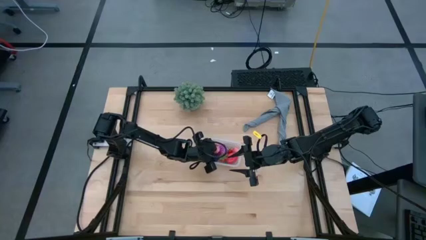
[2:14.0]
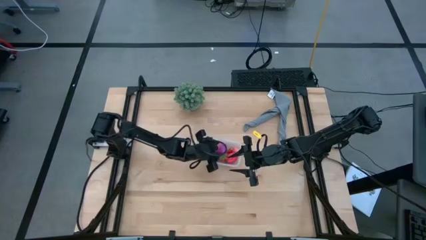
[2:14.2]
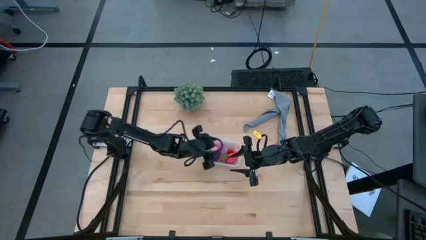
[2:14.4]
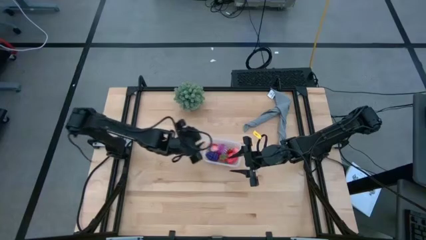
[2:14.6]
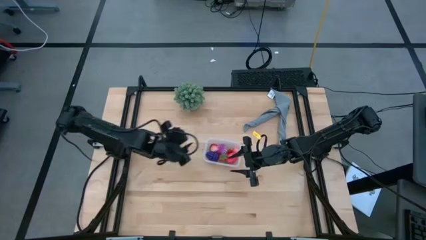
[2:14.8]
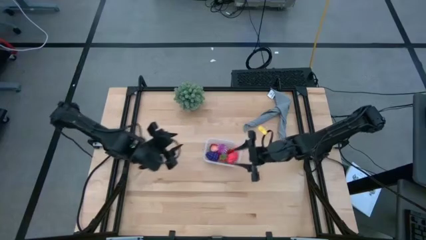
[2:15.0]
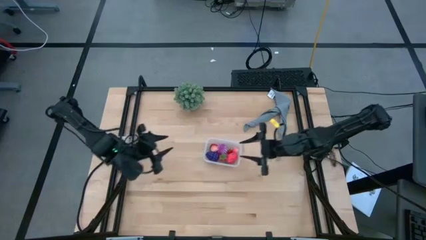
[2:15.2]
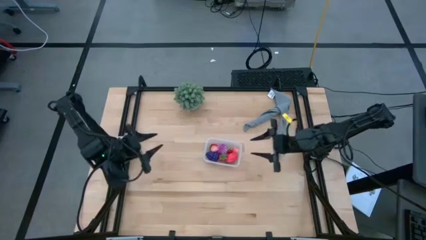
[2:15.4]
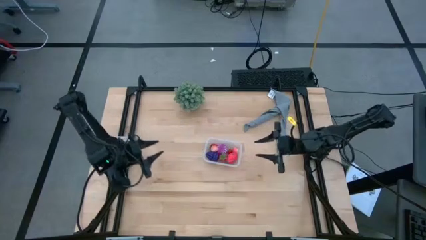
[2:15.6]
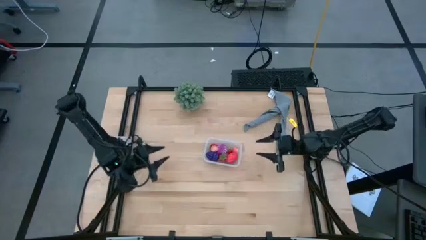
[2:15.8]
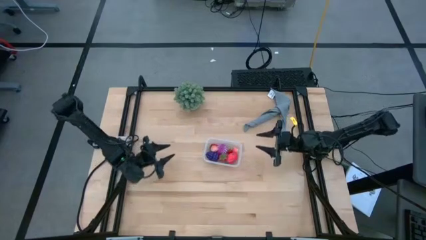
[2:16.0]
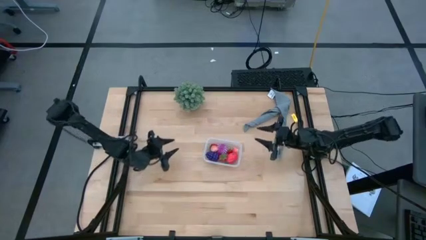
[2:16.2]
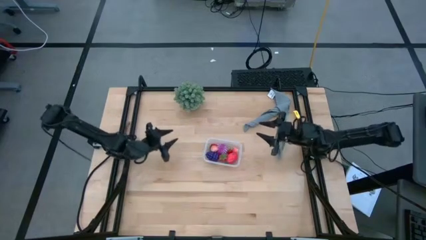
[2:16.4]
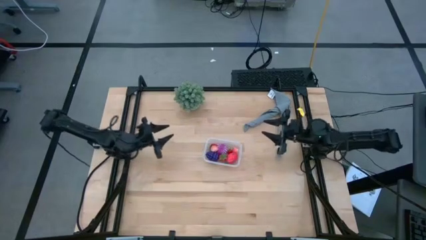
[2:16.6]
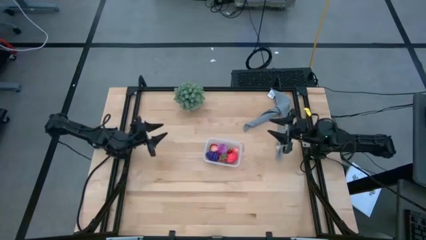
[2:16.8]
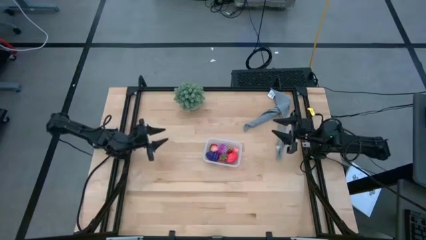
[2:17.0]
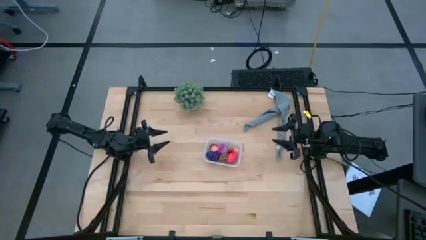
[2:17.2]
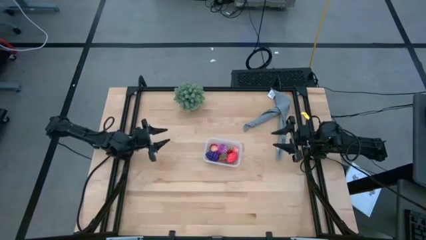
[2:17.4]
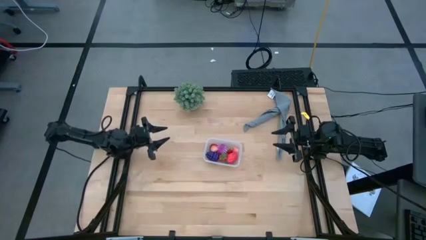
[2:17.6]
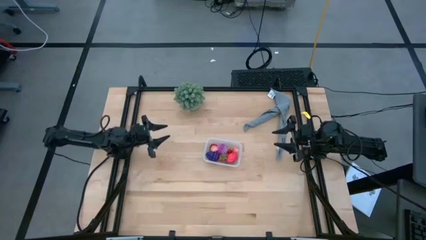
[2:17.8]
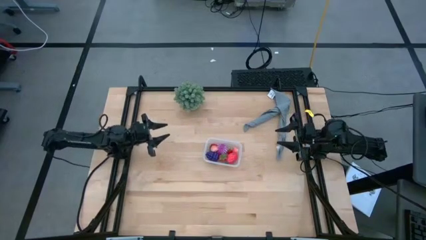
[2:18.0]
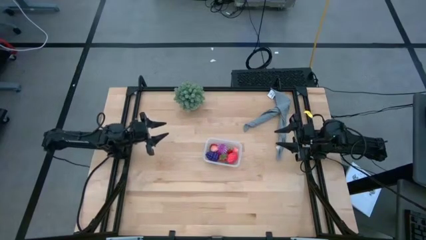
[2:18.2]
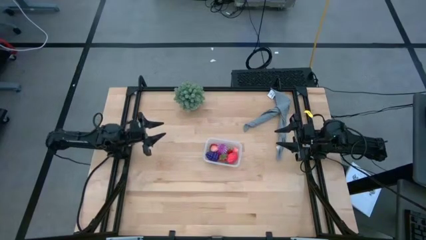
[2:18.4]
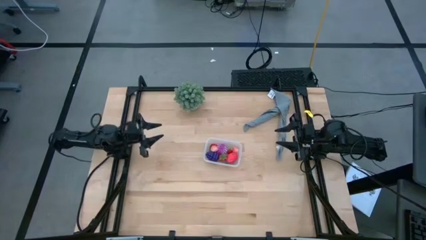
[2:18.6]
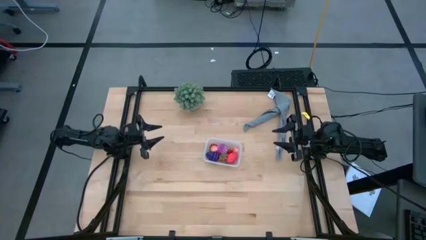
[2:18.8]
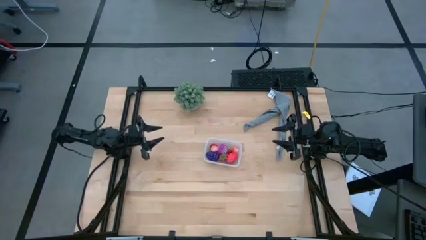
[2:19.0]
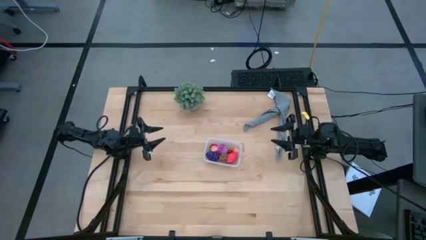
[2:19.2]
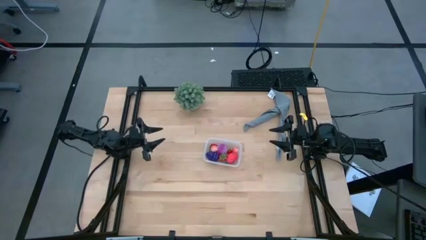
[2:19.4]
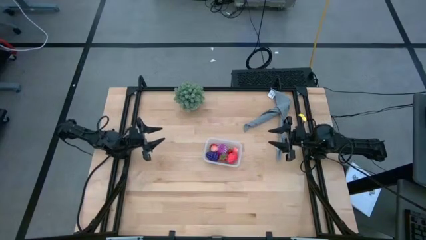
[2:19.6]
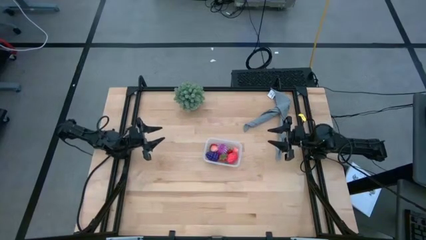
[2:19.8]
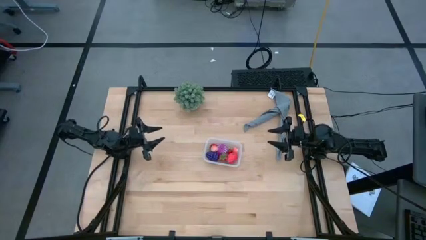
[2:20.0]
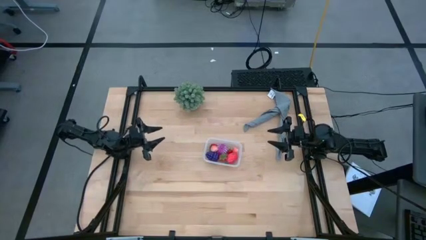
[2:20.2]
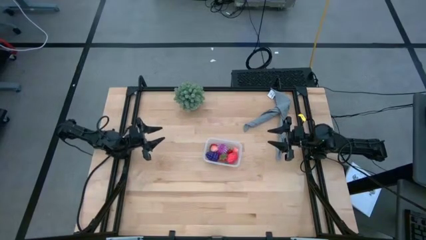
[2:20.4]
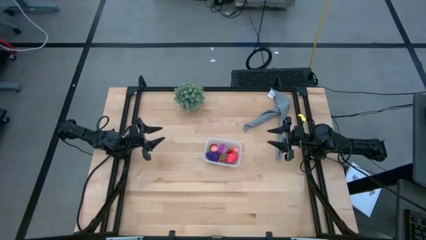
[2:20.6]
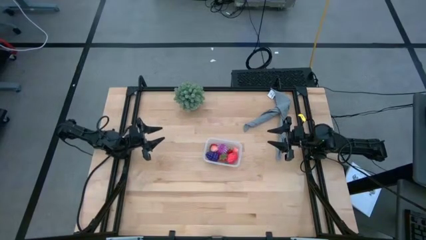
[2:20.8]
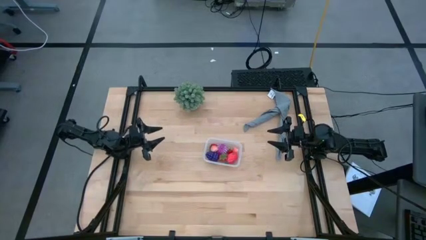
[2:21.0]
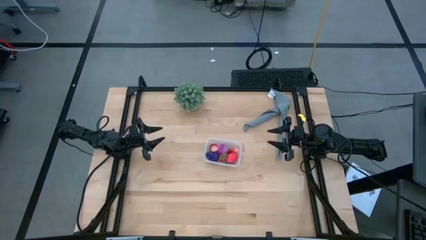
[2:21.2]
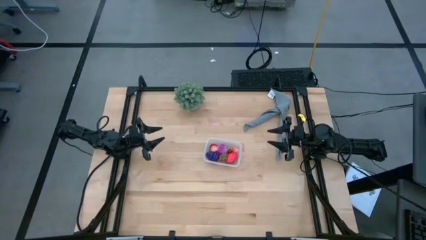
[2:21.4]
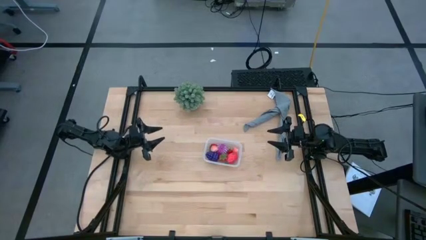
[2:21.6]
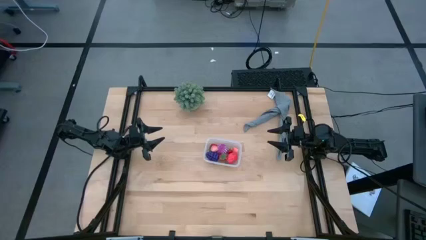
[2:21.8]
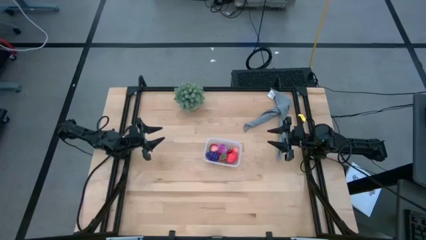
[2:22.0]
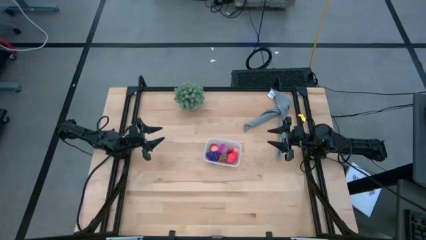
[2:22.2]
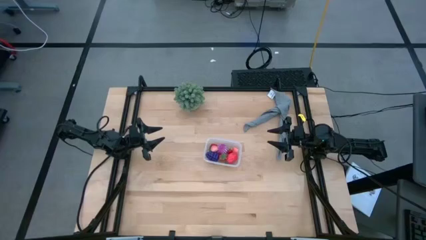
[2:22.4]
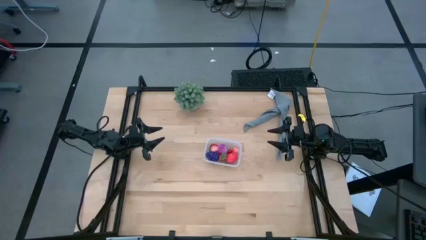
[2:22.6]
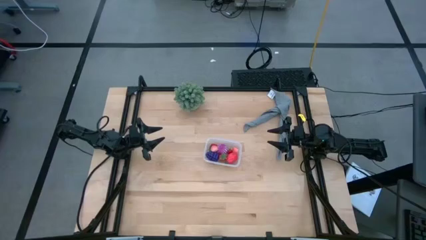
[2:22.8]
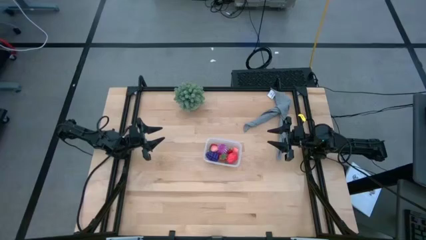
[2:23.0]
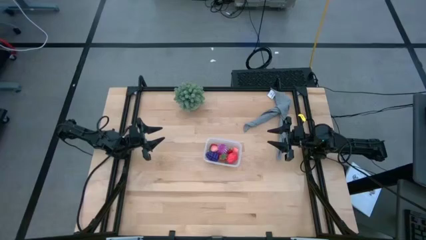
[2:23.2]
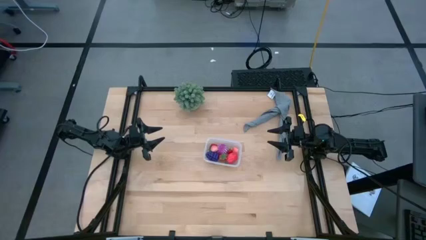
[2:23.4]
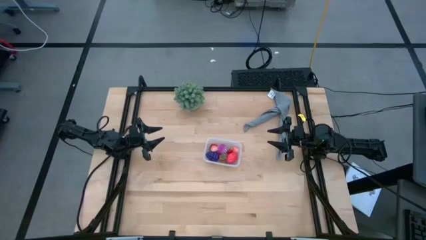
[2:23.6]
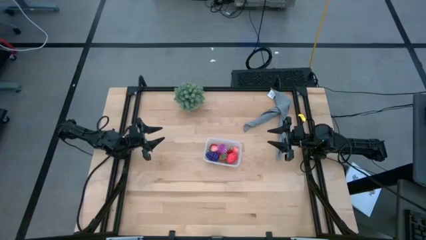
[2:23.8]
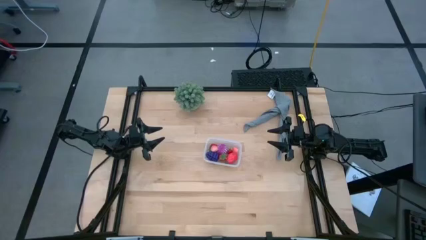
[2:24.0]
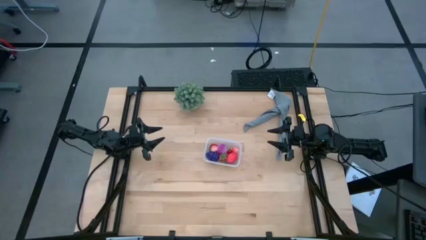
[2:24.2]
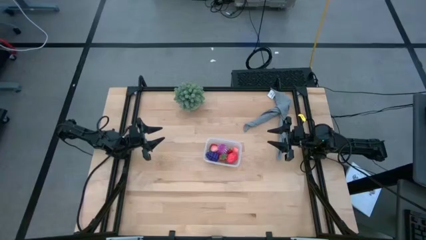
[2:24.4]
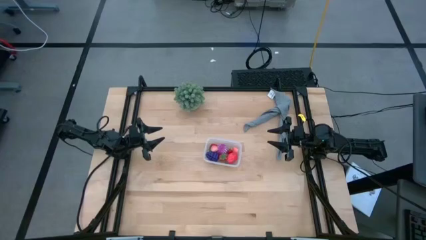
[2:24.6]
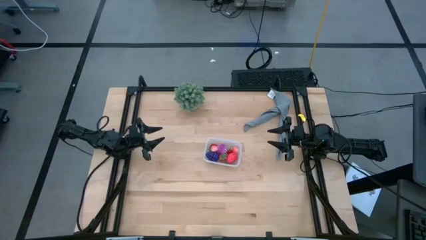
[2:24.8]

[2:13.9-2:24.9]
Task: Pick and placing Produce into tupperware
Return to Home Position

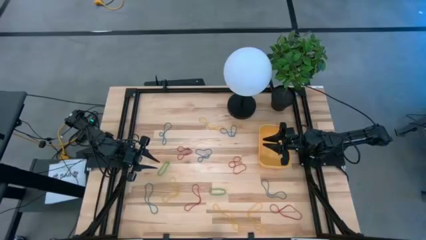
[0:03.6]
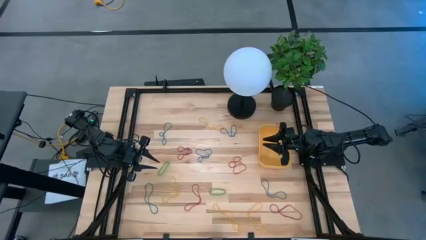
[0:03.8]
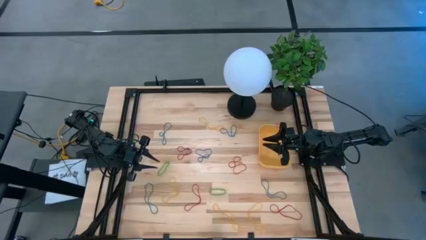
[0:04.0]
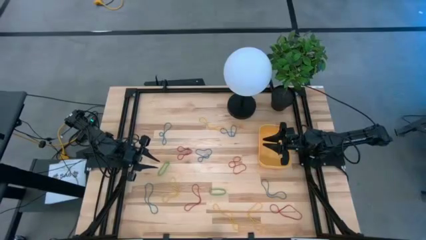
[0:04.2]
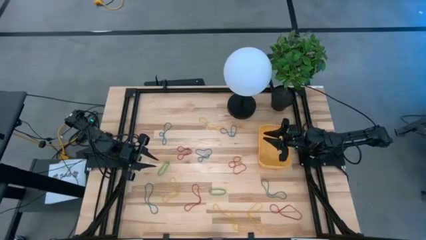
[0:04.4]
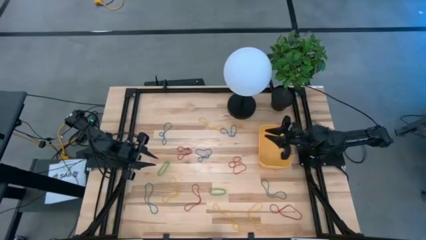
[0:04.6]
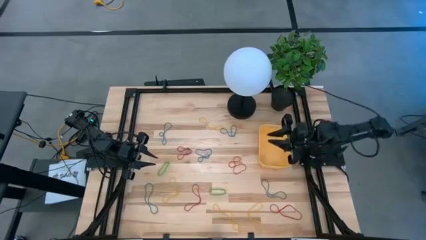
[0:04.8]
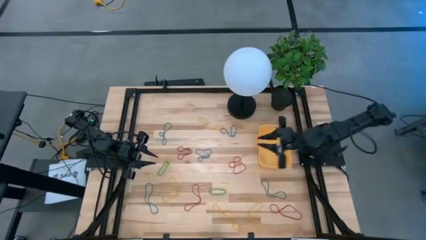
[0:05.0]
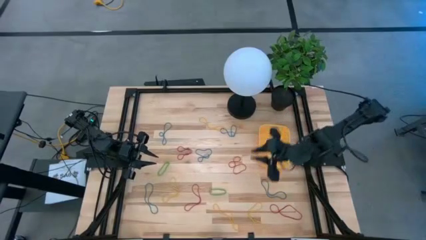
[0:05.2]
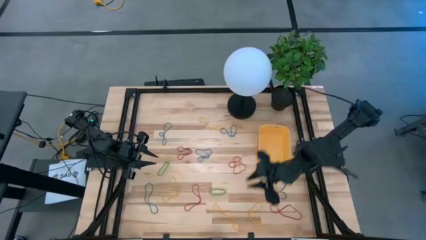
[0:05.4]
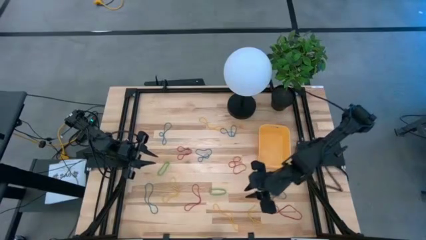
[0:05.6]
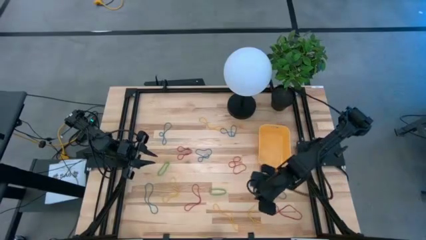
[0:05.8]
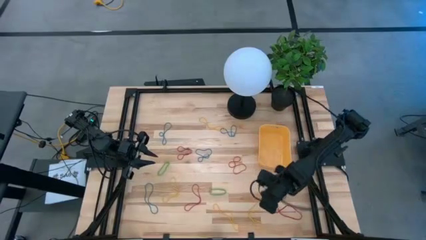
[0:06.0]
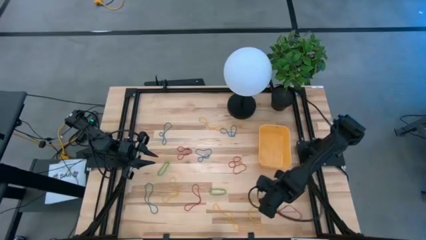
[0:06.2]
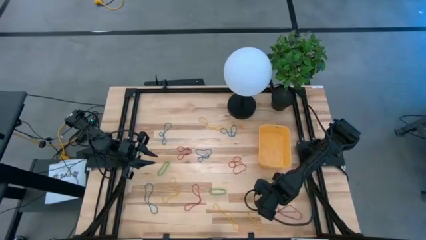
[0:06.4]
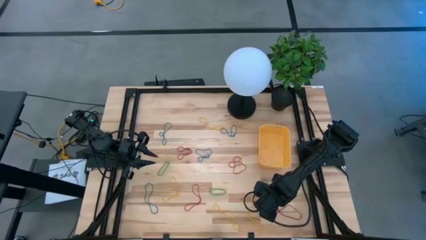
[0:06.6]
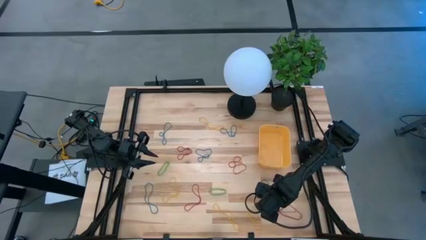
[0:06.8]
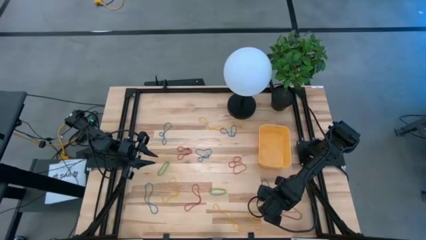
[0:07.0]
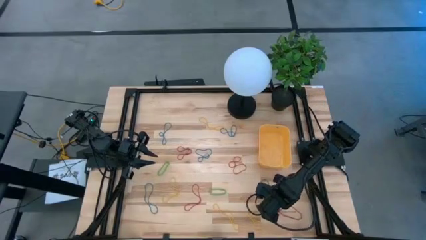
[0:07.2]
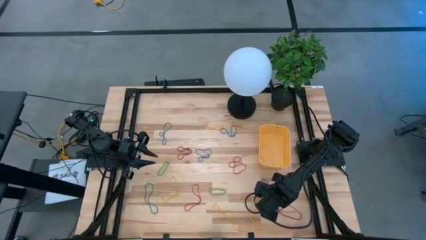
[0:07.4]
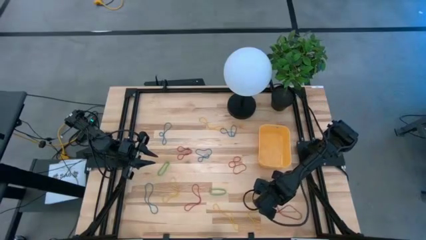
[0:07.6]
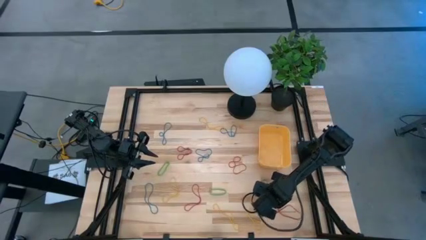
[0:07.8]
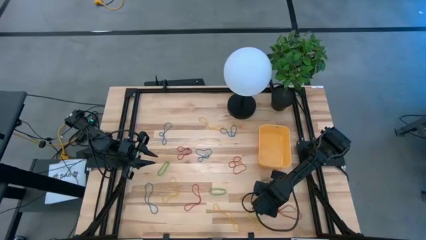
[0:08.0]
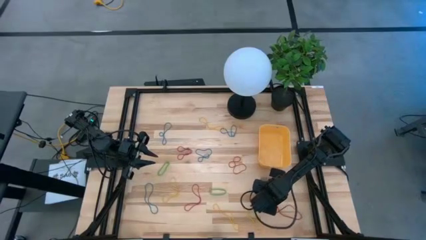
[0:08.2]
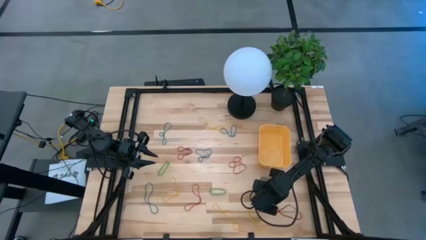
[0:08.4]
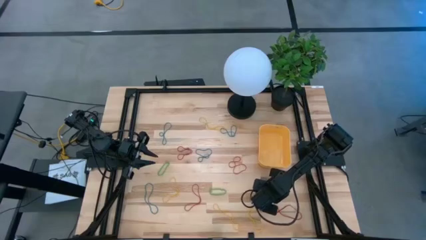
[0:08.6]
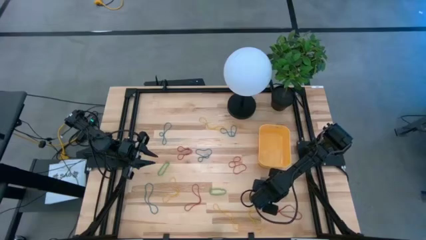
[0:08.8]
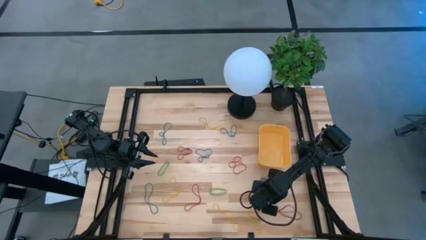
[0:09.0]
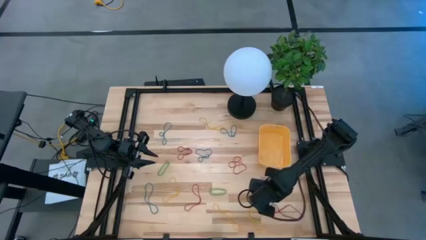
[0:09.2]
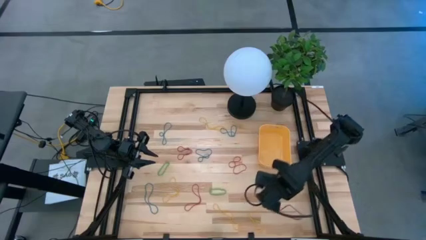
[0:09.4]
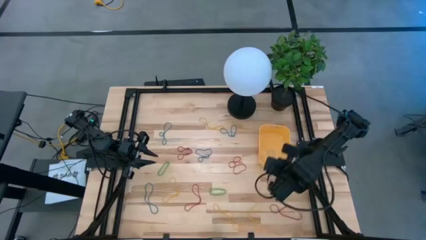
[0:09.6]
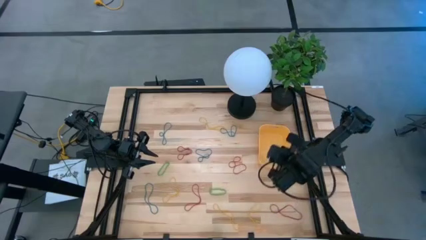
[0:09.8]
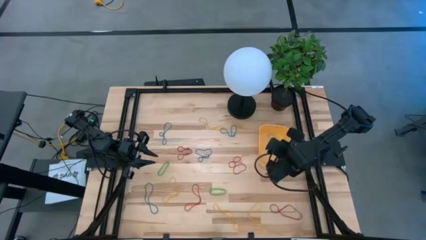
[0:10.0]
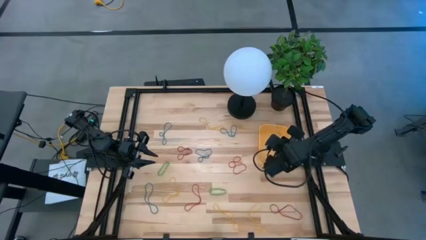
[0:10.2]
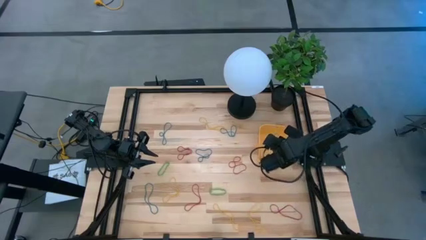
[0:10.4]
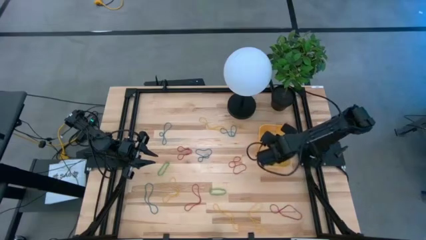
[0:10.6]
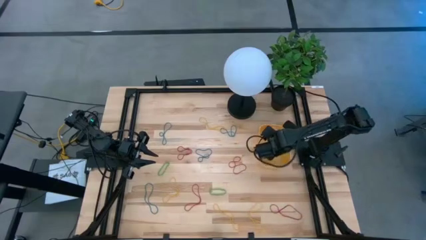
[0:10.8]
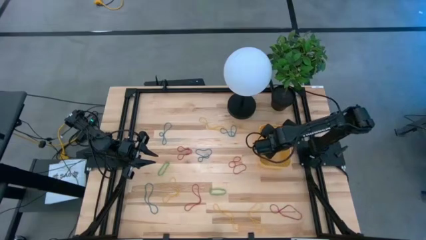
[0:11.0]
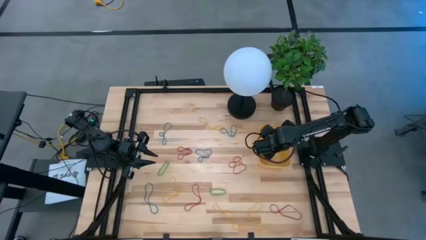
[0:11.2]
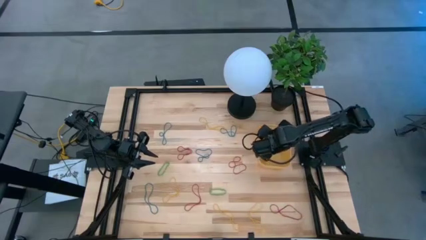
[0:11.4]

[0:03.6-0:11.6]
Task: Pick and place items into bin
Put the blue rubber band into the bin
